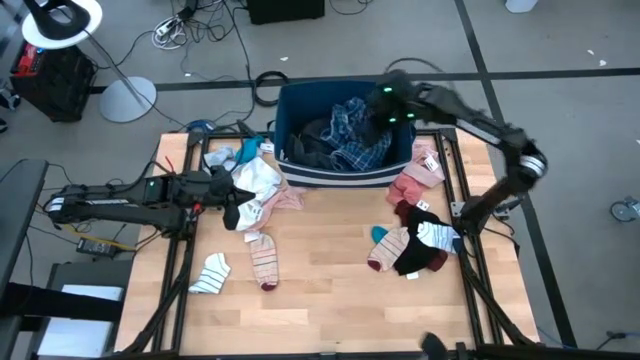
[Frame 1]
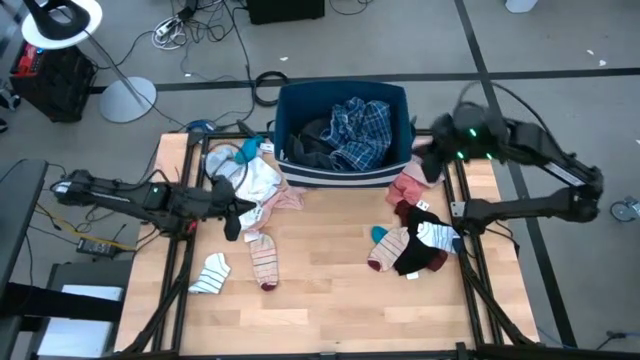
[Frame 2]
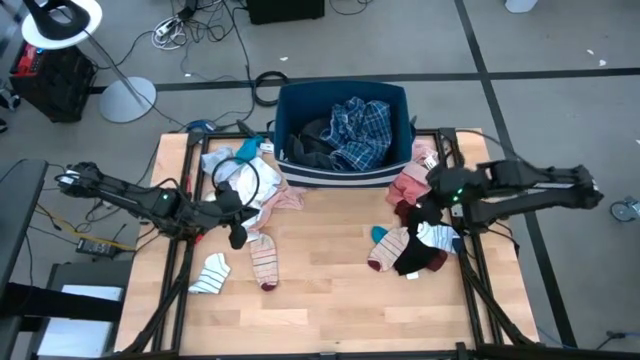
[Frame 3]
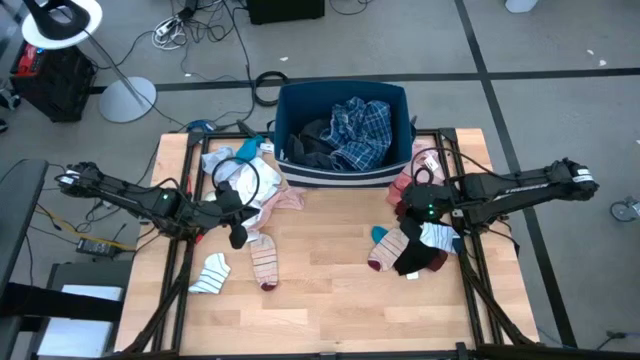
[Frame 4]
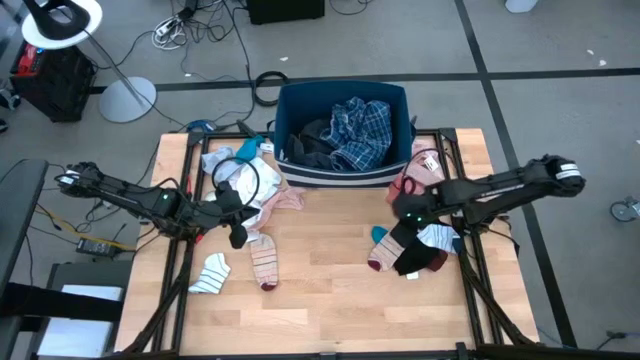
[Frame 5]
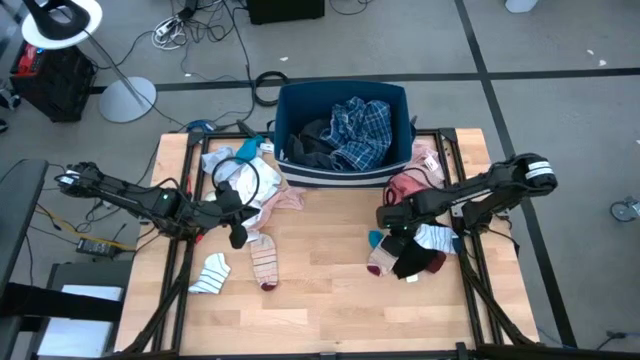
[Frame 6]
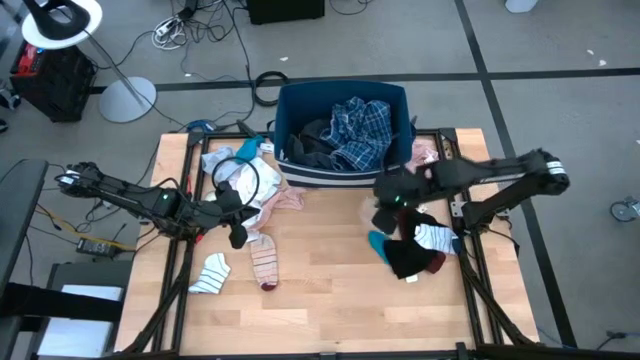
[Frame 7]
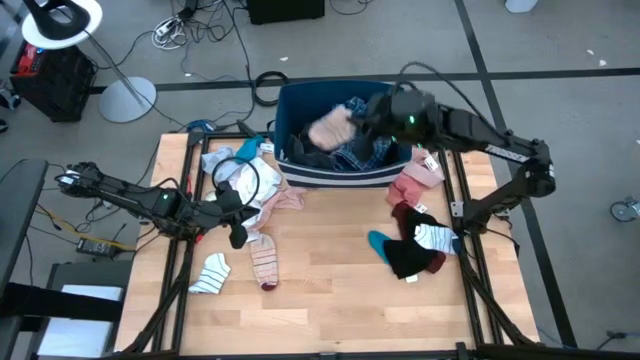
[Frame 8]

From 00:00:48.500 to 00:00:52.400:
Task: Sort clothes
Put the right striped light pink sock into the blue bin

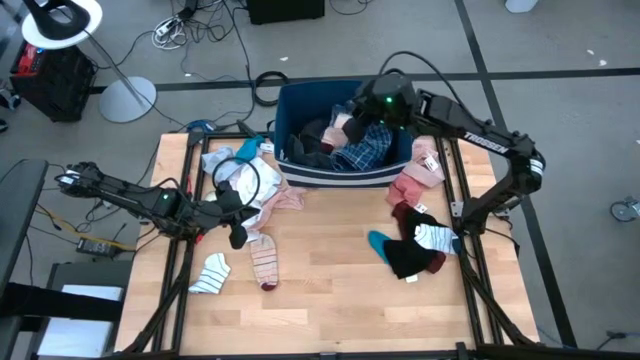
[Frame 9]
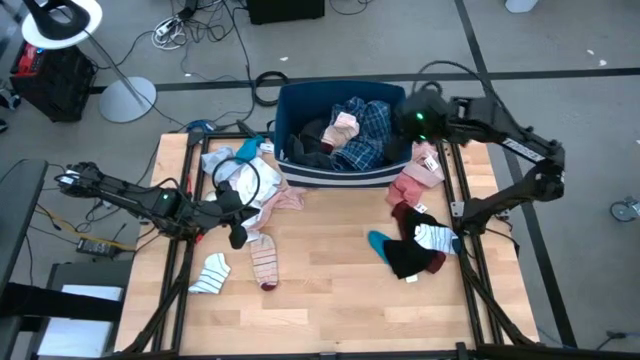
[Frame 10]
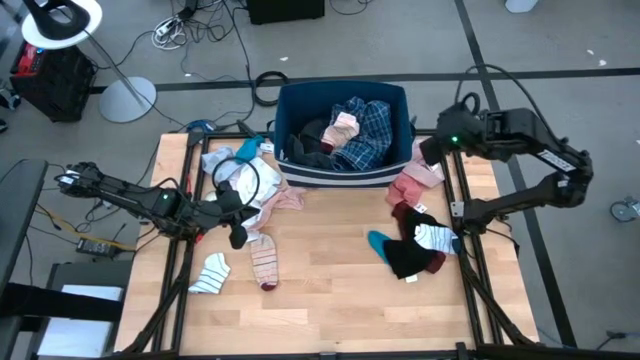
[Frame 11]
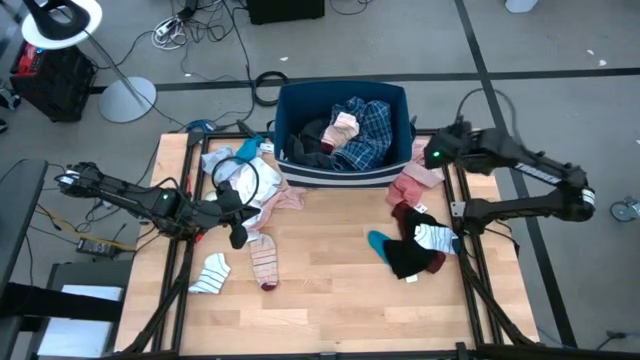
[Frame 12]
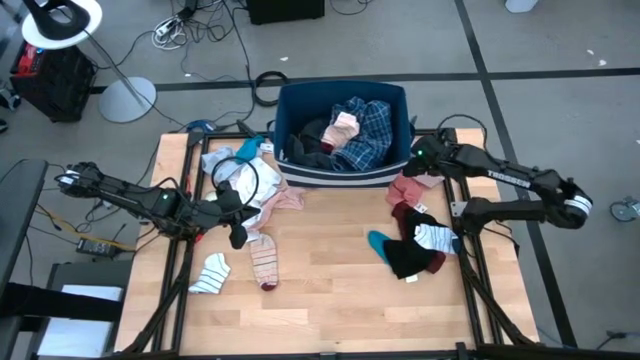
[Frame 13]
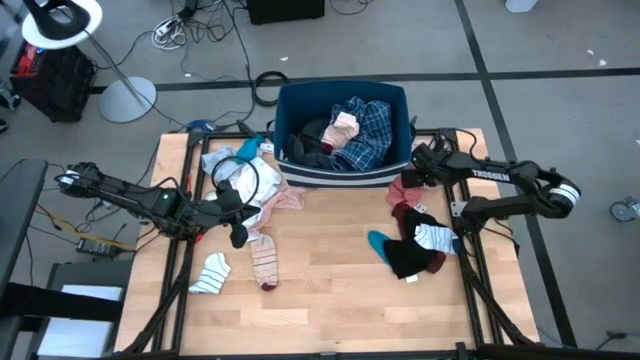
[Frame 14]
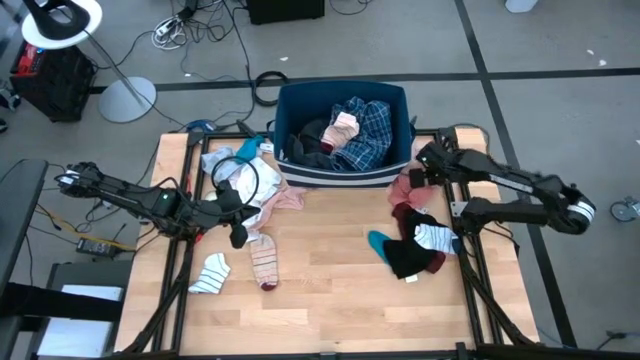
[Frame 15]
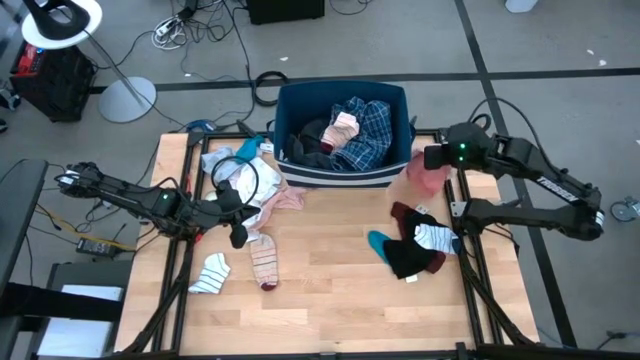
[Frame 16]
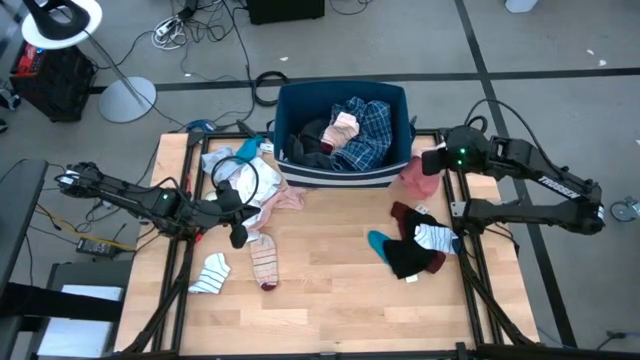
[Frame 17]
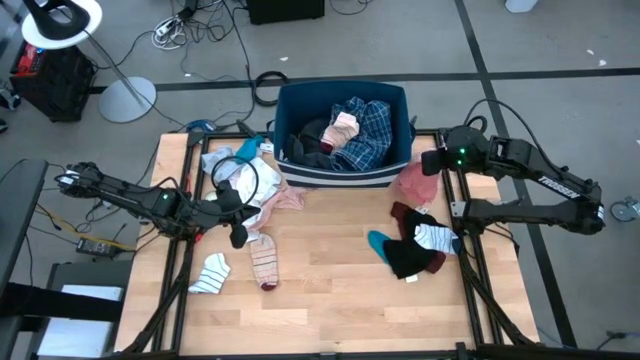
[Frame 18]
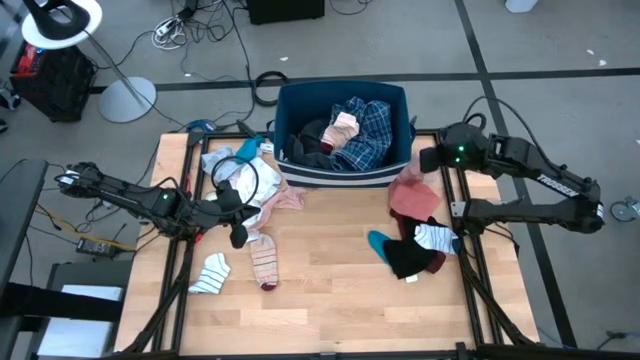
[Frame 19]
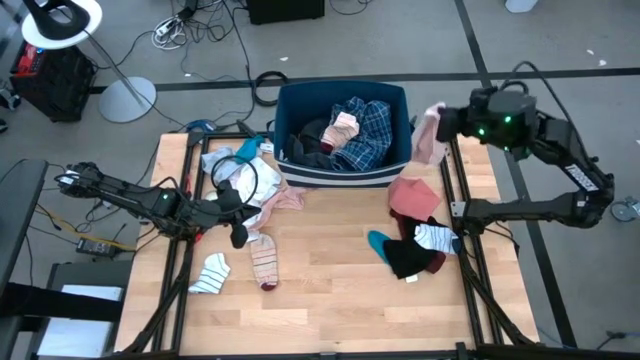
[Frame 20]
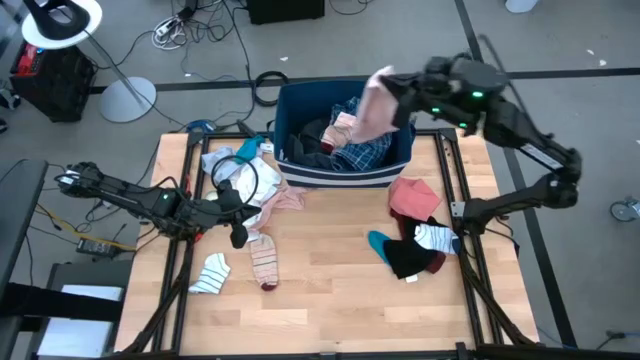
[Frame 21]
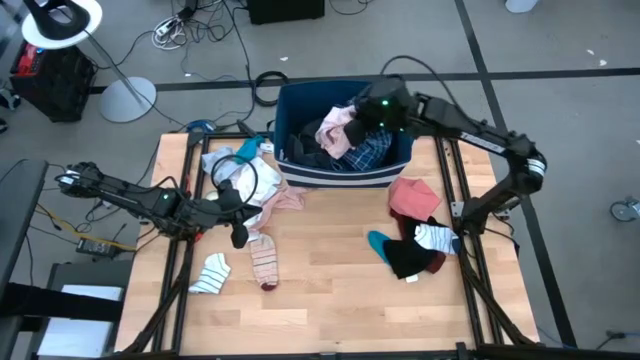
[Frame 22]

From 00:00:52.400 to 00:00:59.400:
Put the light pink boxer into the blue bin

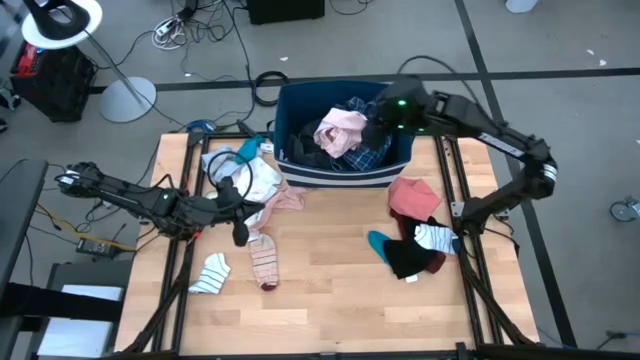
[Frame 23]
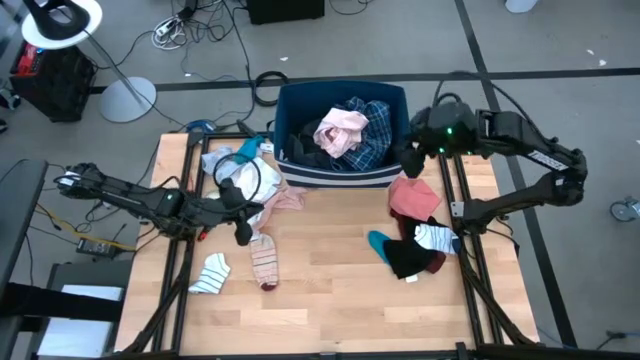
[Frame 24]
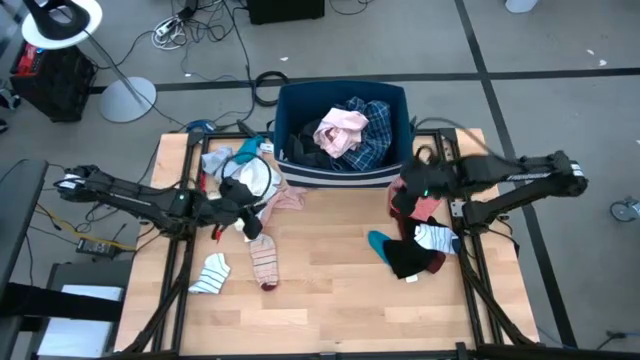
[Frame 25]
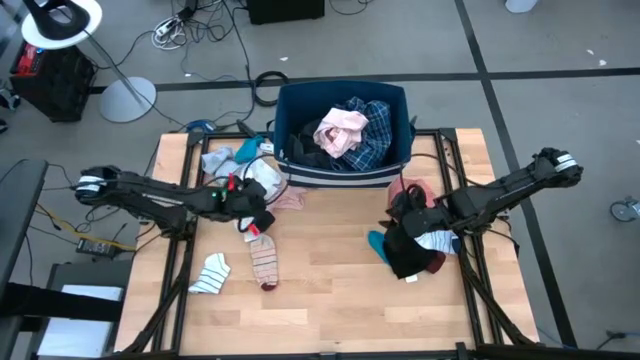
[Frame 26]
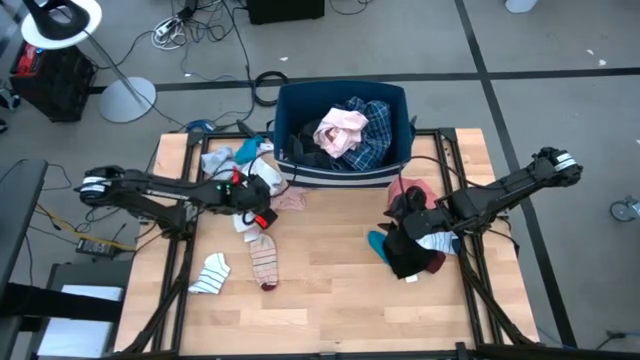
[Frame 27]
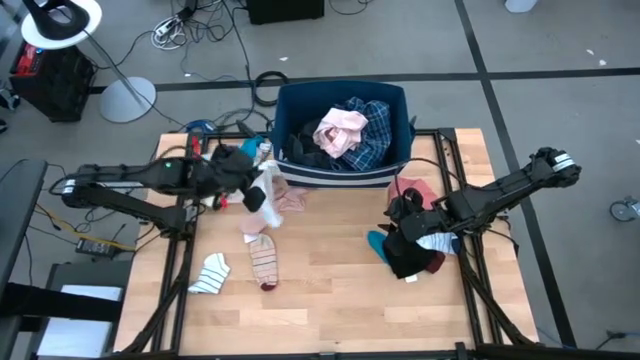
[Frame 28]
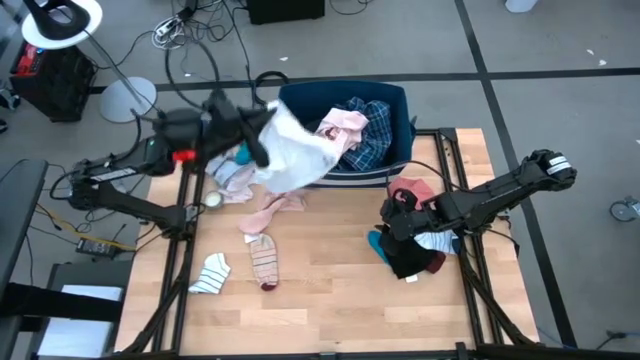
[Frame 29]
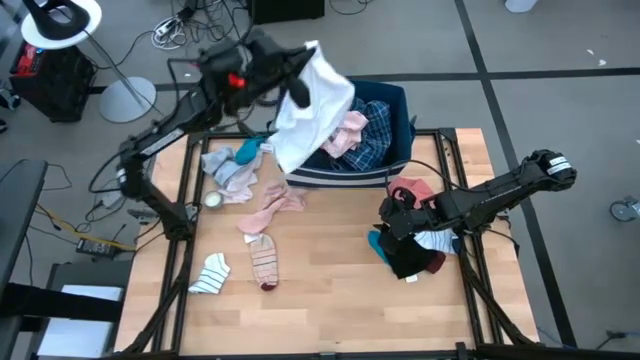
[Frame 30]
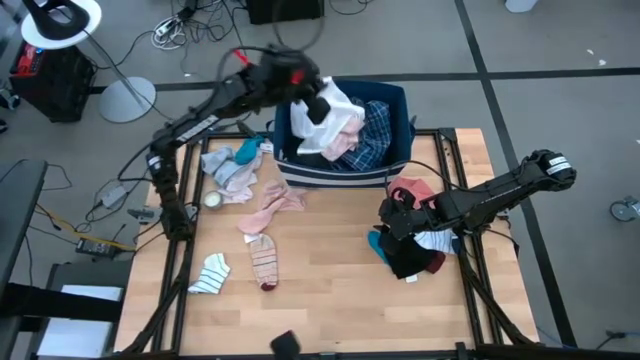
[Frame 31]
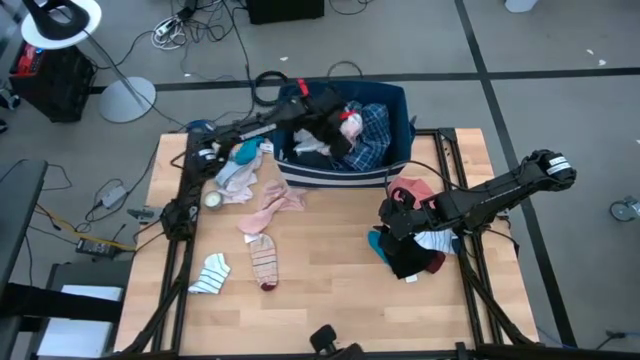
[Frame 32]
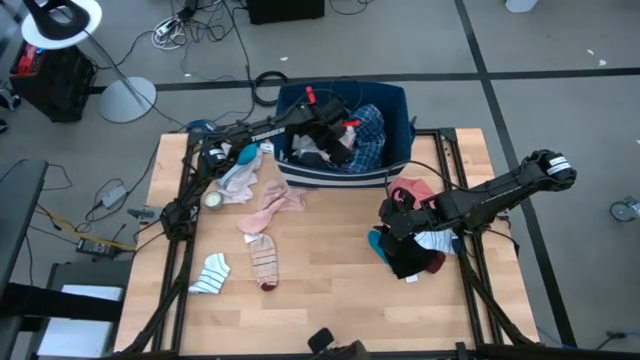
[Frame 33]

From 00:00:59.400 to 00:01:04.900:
Put the white boxer into the blue bin

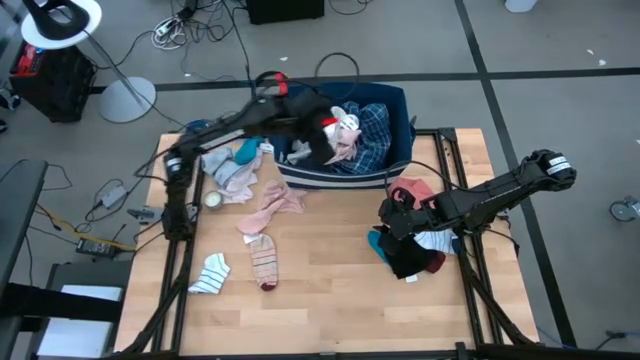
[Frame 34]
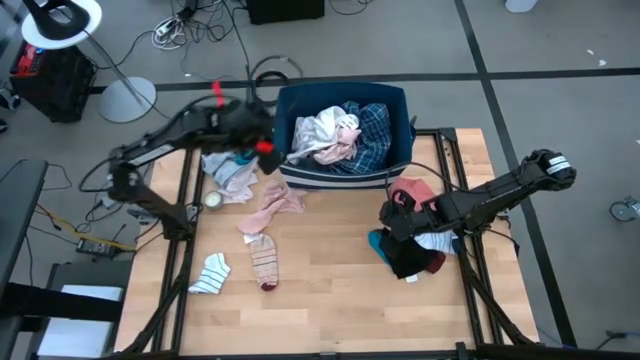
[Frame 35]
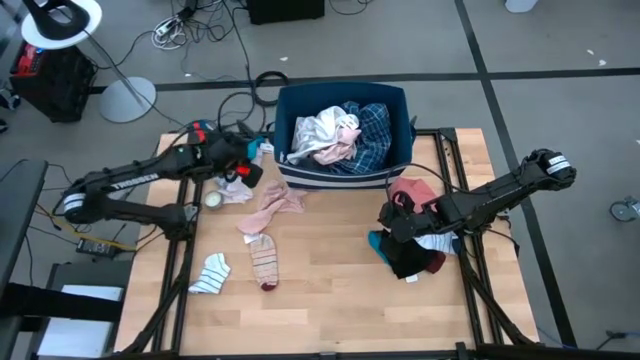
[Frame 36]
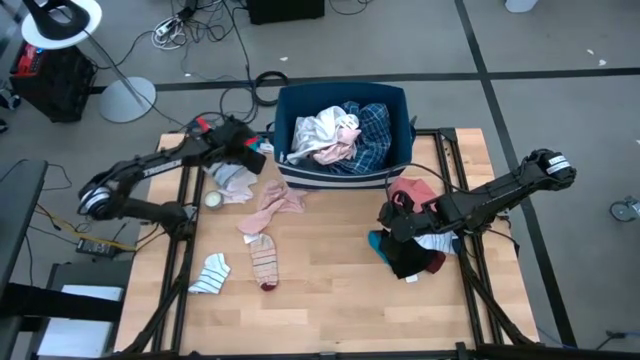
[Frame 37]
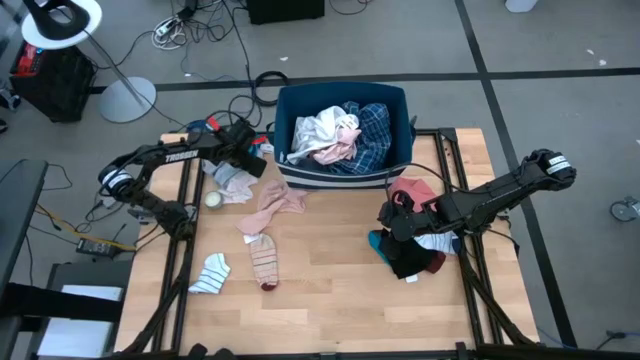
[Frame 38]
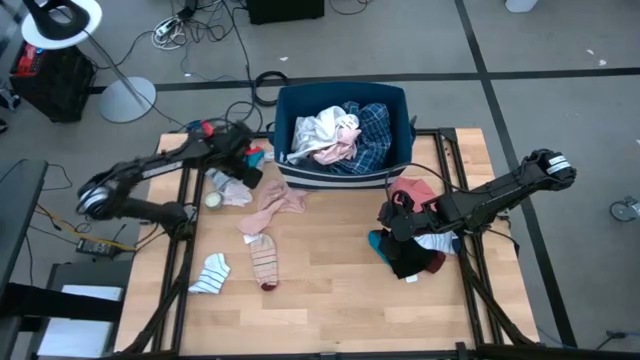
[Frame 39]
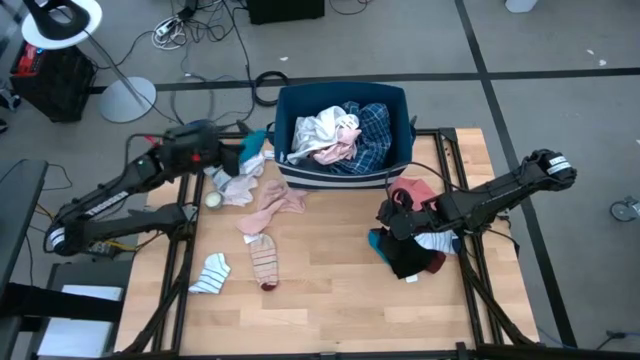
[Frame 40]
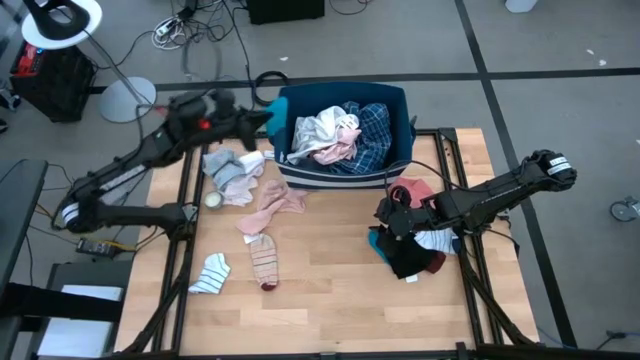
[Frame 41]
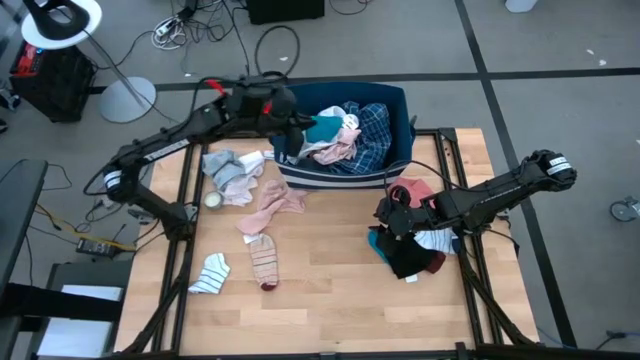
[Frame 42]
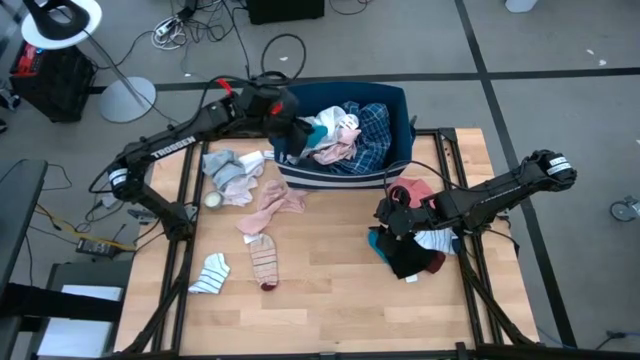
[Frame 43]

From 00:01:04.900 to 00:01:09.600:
Put the left blue sock into the blue bin
